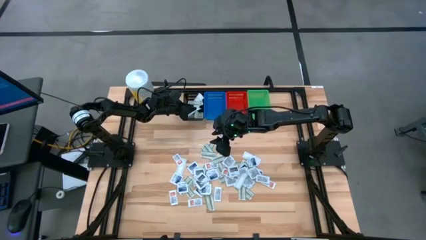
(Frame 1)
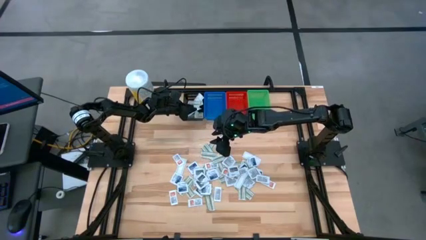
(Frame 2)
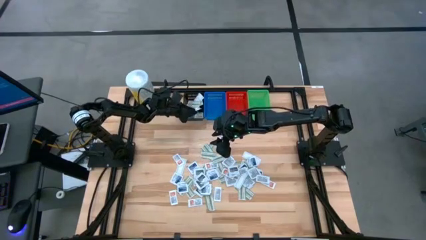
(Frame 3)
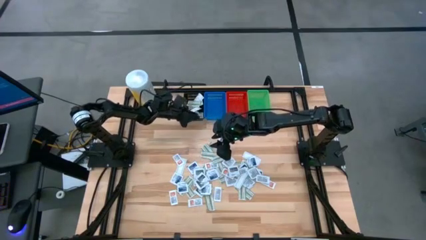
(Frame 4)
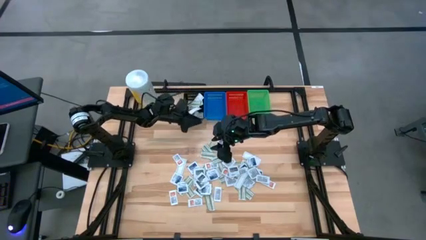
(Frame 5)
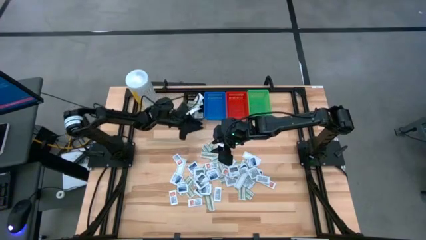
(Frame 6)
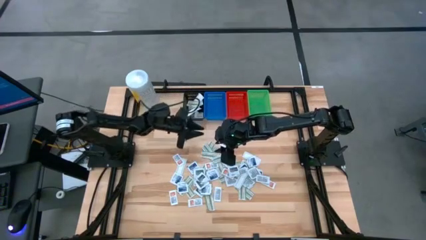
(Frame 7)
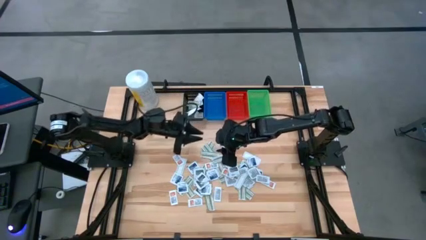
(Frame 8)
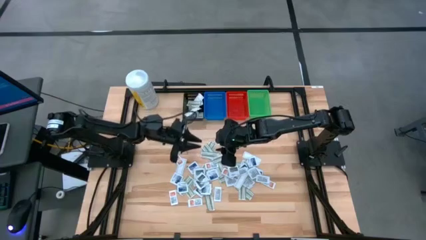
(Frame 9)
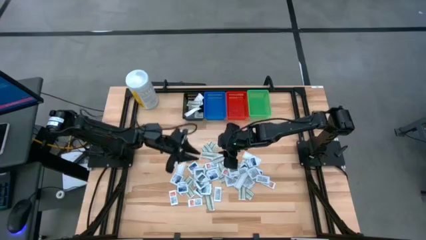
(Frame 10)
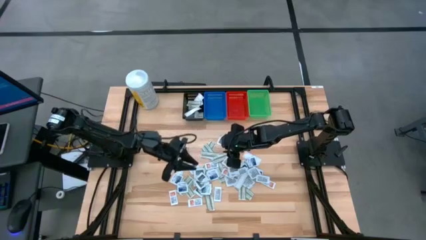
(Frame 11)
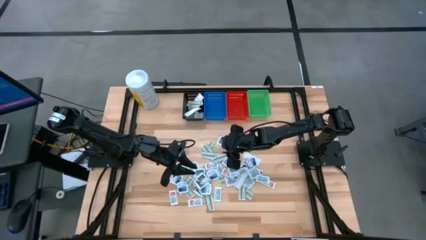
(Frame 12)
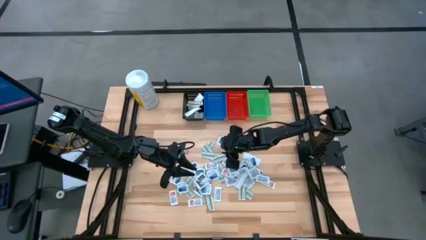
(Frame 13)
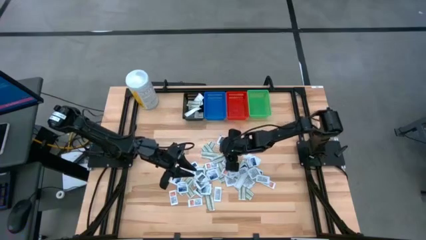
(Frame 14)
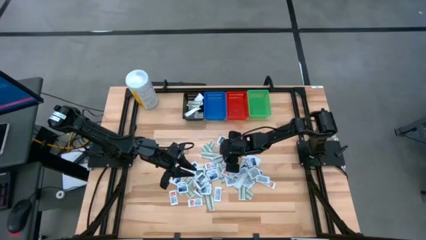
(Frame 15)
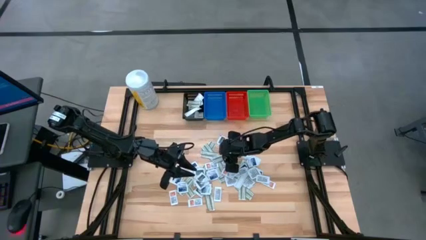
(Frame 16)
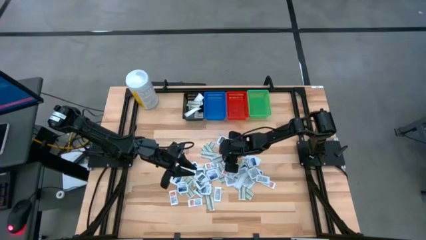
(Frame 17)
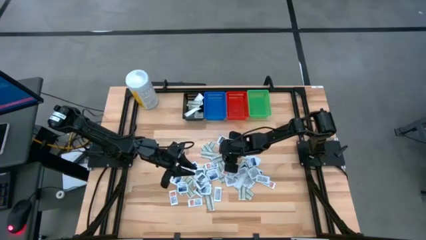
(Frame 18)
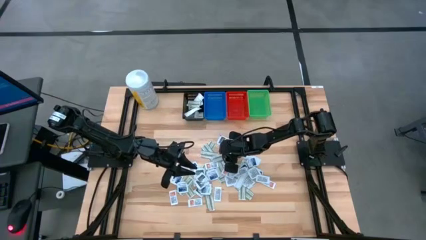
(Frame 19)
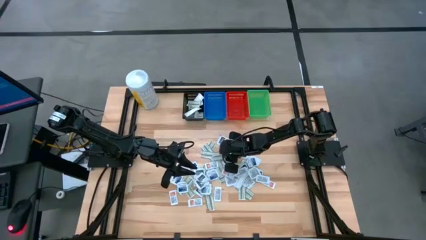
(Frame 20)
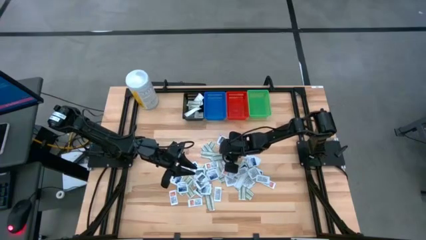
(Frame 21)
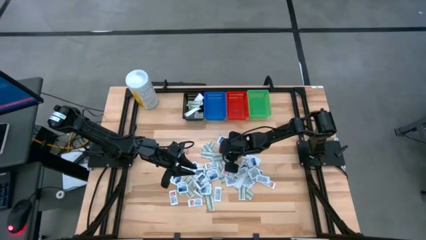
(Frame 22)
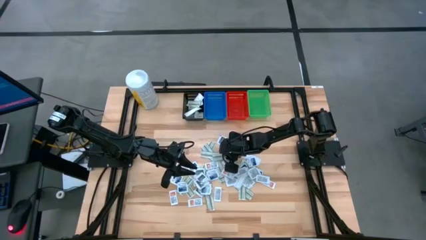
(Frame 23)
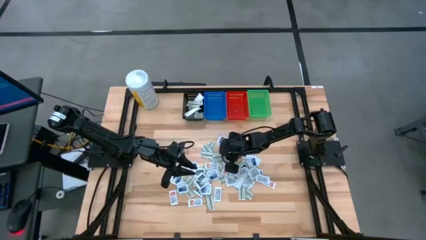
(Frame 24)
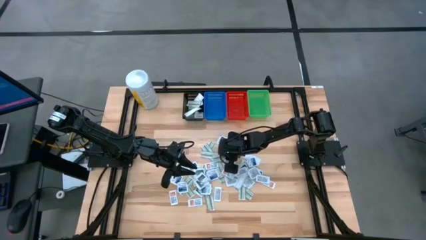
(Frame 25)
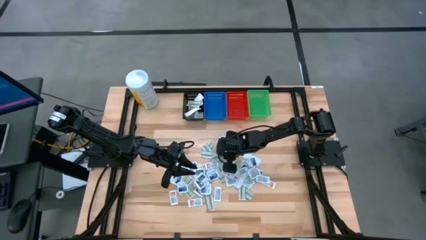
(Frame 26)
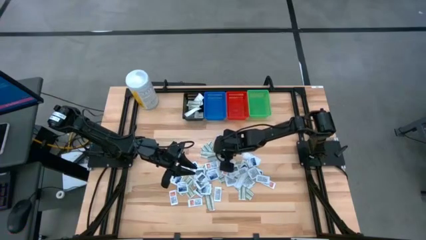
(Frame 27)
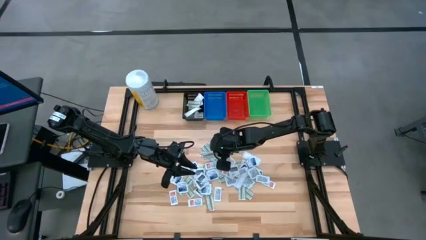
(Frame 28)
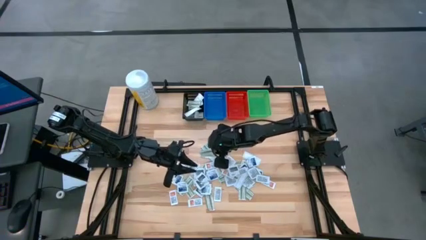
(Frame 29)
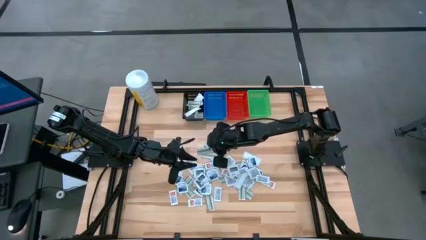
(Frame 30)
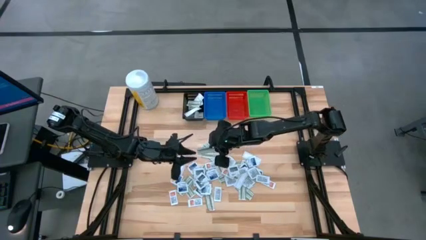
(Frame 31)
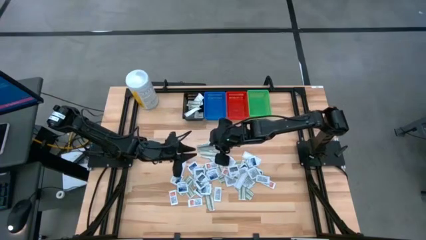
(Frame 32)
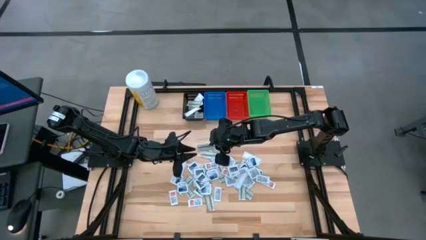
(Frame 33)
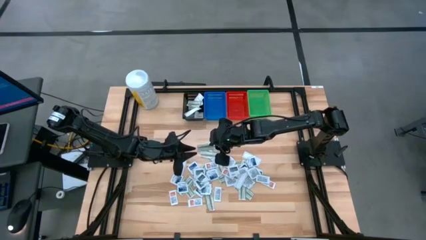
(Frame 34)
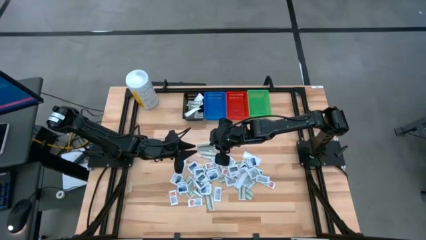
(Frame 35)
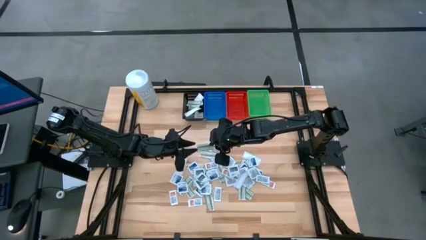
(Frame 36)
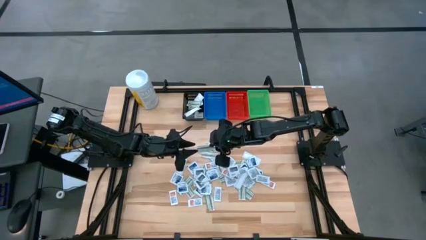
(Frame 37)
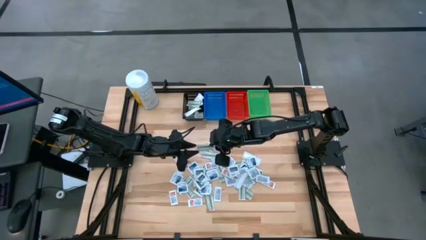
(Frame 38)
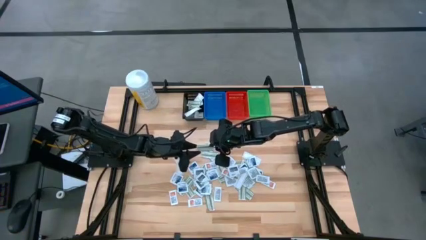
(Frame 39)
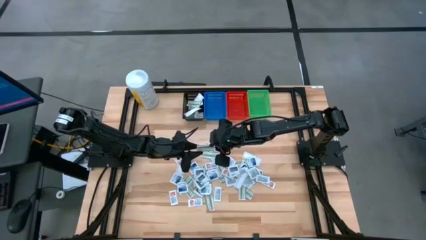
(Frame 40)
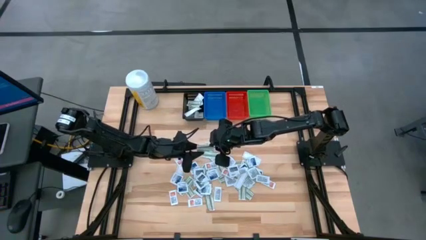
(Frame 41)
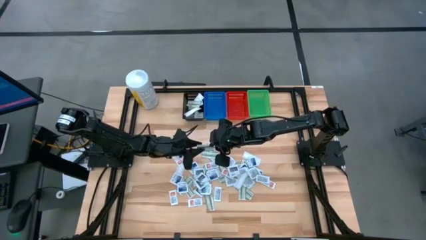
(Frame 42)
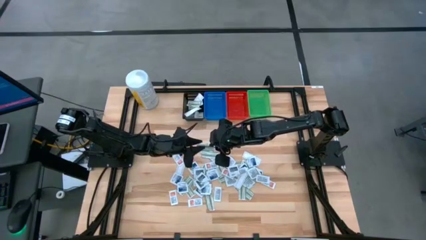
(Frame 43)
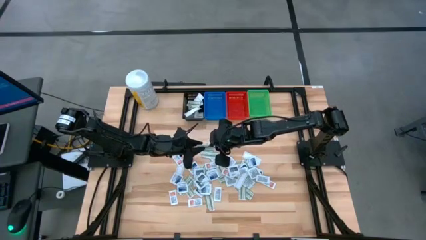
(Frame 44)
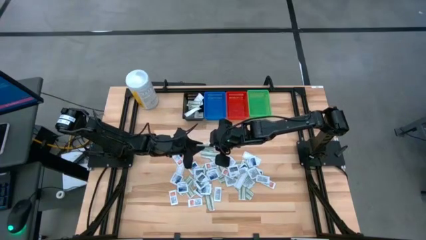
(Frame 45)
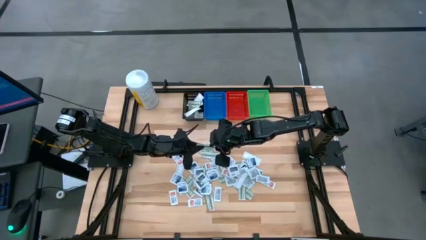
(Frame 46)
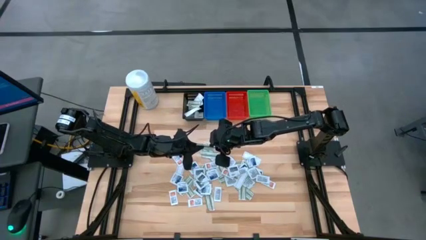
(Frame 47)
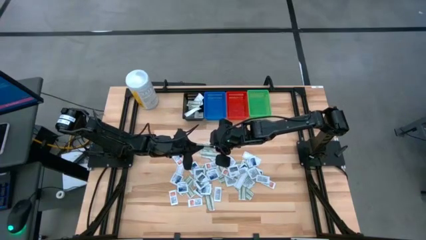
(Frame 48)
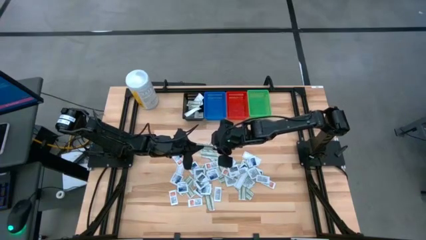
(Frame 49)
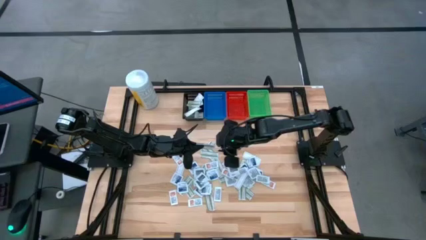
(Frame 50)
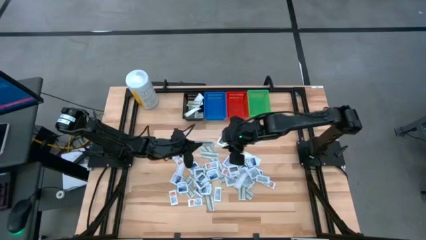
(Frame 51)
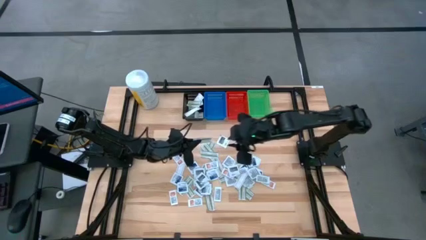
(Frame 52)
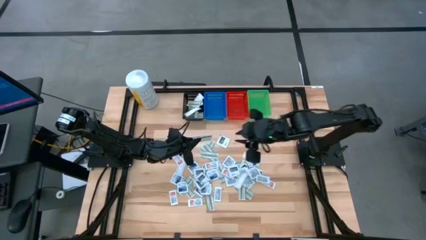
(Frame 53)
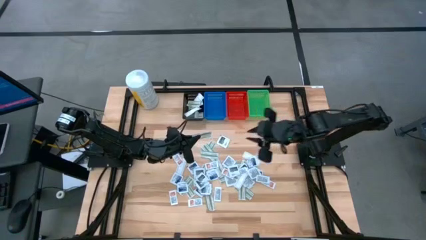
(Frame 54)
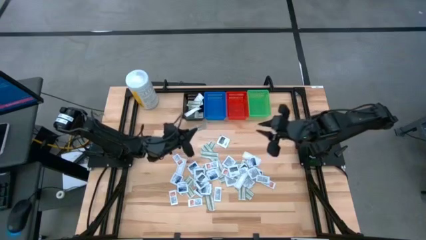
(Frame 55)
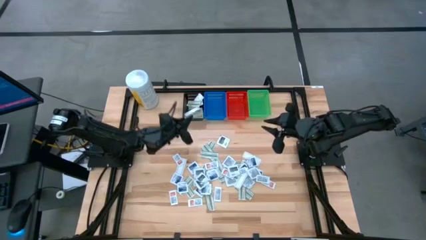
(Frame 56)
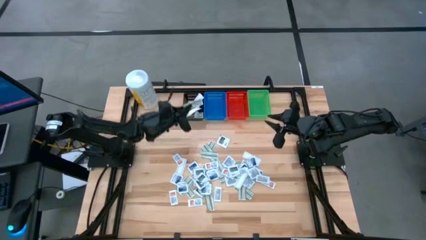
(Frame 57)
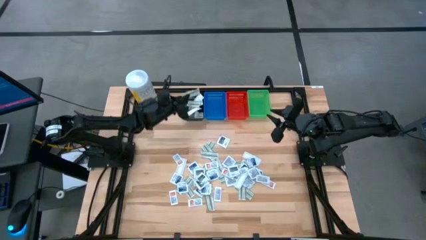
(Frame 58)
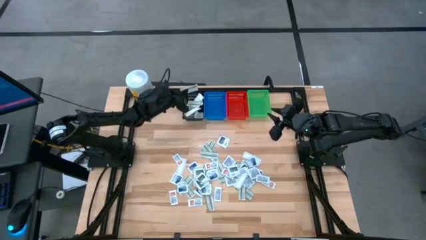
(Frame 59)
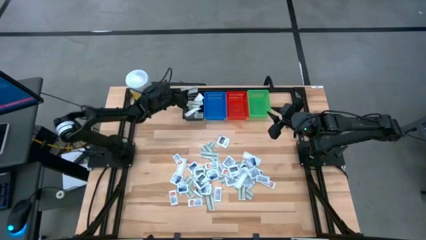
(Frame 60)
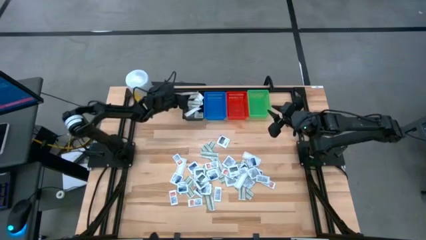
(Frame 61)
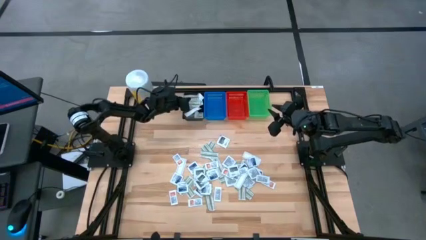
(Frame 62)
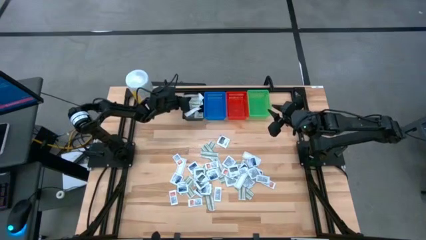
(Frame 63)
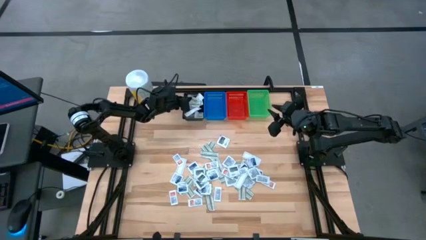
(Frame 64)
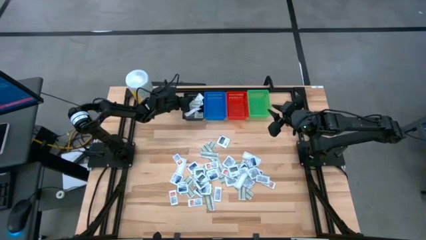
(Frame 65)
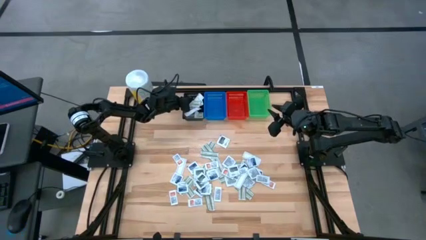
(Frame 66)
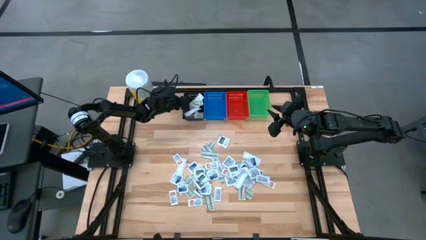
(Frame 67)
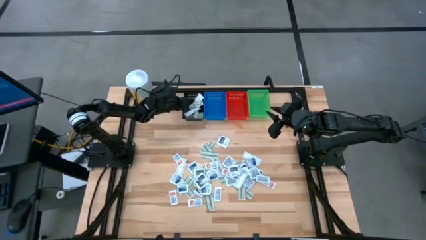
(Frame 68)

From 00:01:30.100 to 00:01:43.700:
Task: Pick & Place First Aid Supplies
Put the green bandage pack in the black bin
